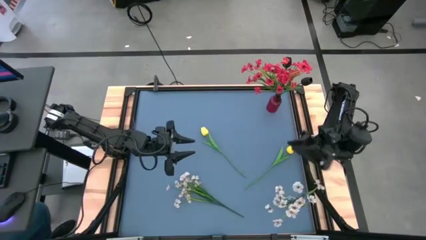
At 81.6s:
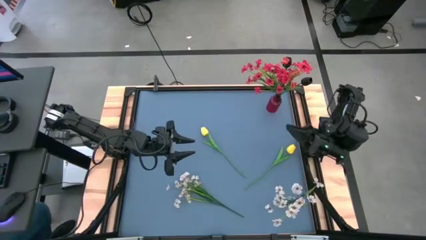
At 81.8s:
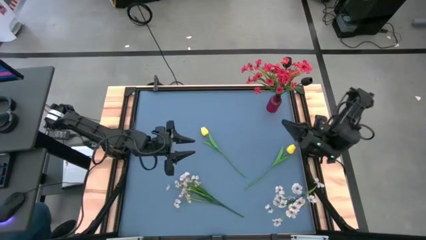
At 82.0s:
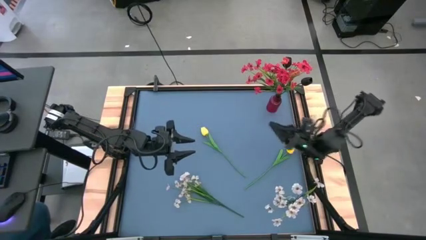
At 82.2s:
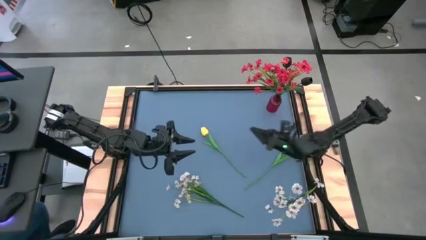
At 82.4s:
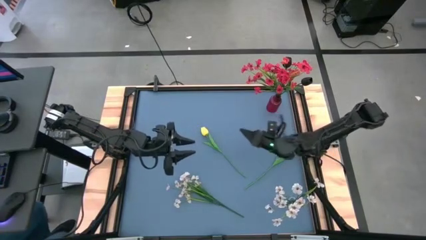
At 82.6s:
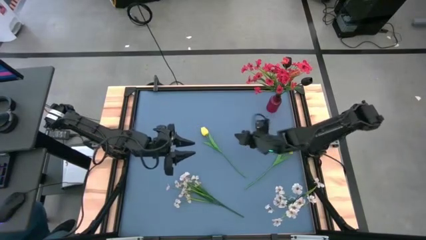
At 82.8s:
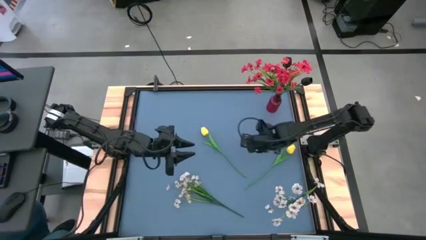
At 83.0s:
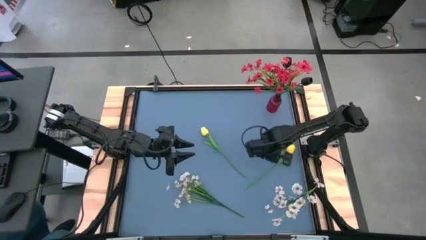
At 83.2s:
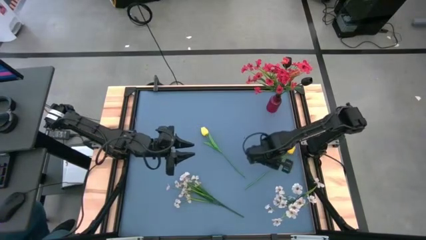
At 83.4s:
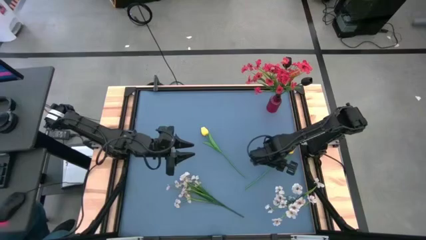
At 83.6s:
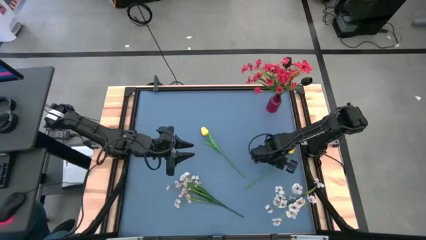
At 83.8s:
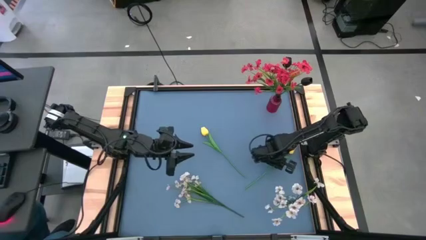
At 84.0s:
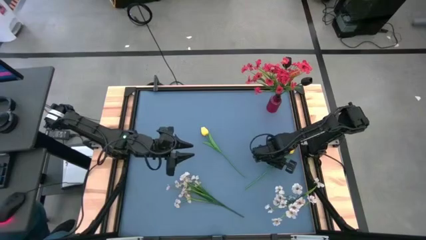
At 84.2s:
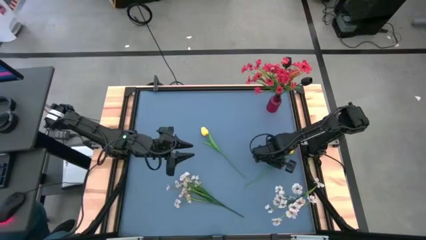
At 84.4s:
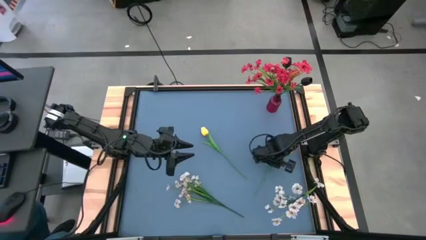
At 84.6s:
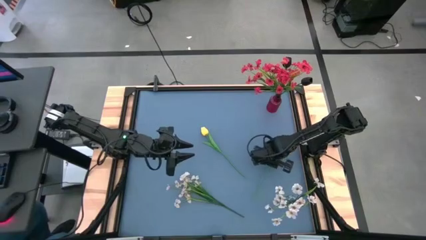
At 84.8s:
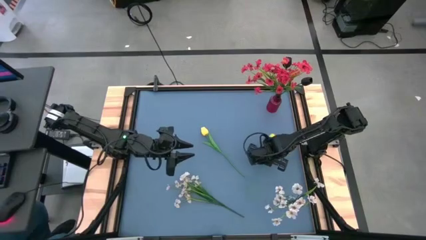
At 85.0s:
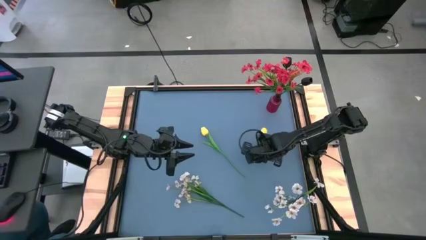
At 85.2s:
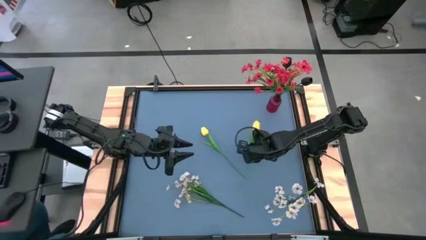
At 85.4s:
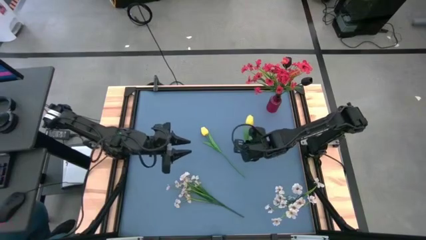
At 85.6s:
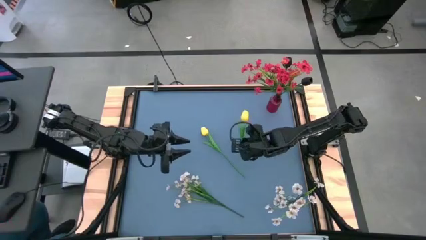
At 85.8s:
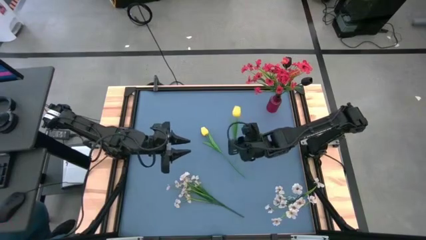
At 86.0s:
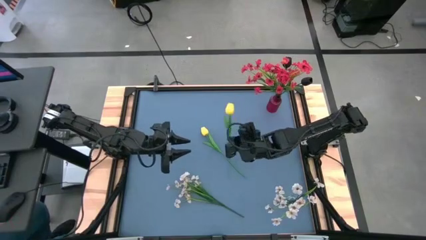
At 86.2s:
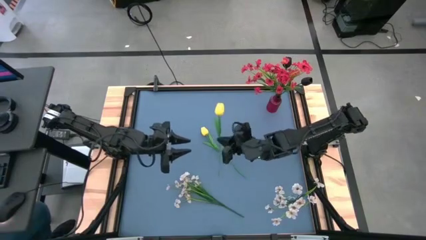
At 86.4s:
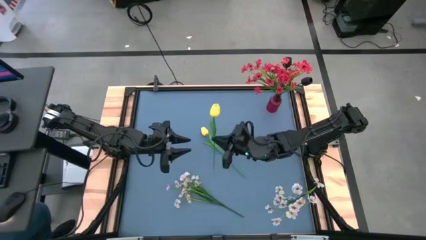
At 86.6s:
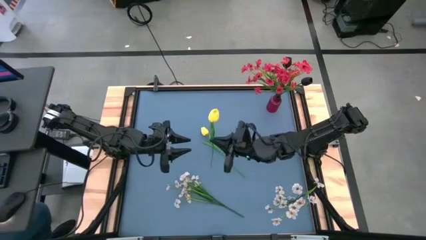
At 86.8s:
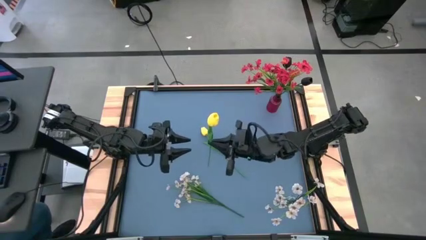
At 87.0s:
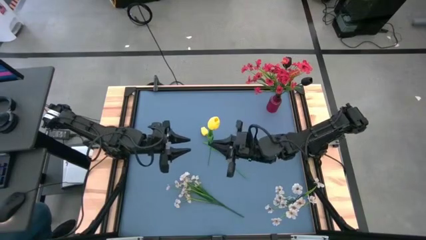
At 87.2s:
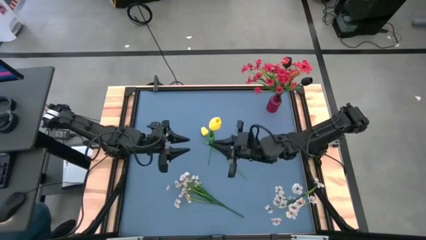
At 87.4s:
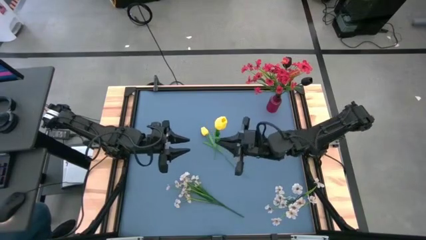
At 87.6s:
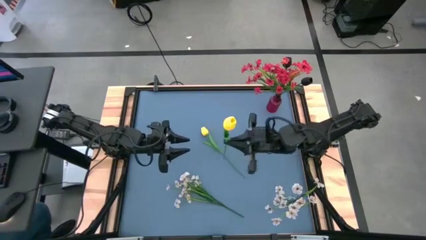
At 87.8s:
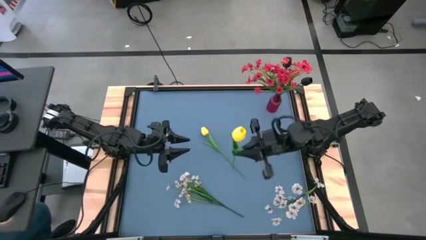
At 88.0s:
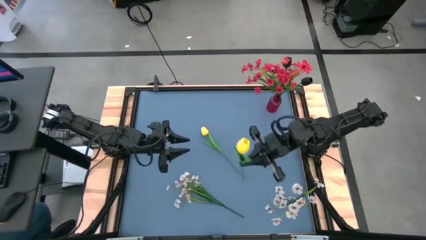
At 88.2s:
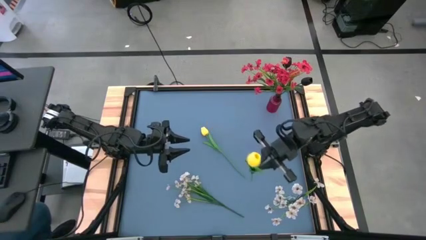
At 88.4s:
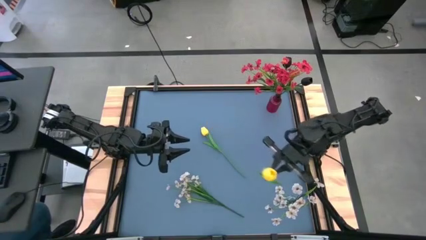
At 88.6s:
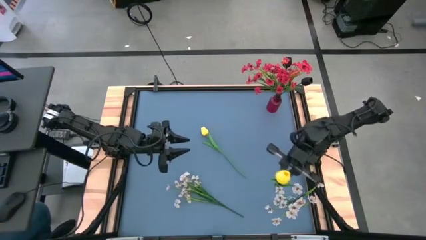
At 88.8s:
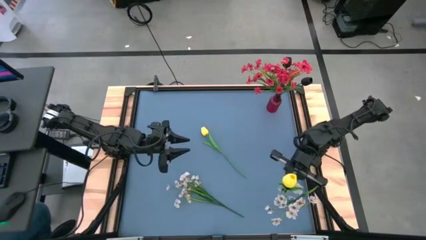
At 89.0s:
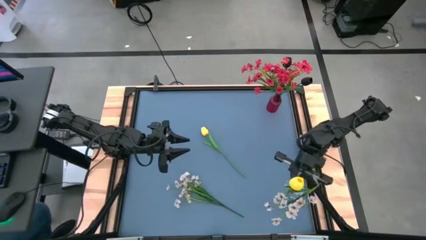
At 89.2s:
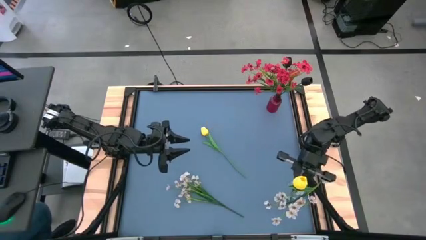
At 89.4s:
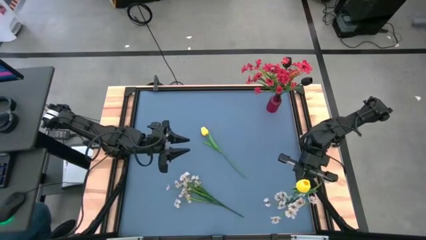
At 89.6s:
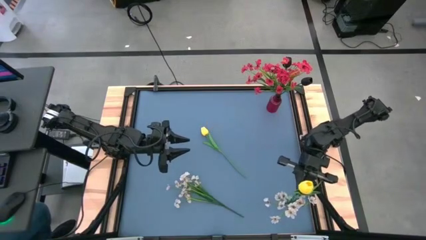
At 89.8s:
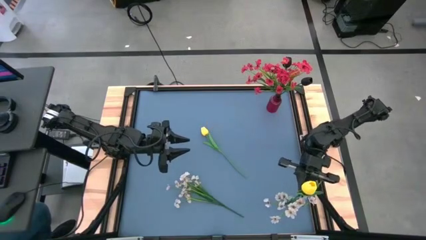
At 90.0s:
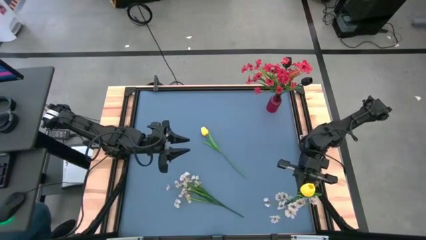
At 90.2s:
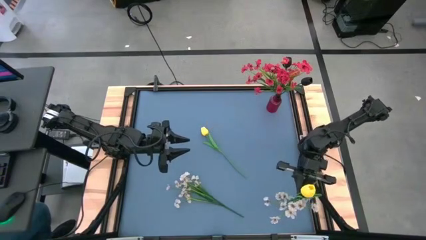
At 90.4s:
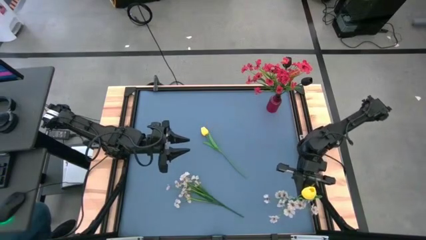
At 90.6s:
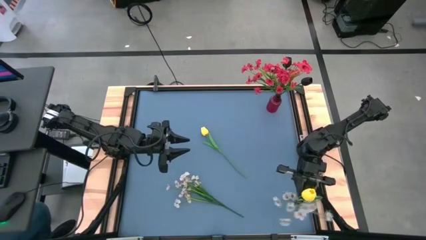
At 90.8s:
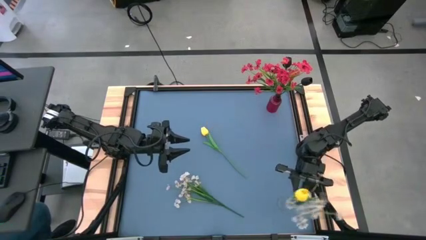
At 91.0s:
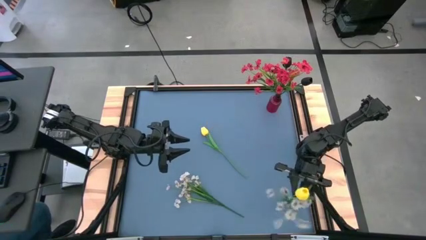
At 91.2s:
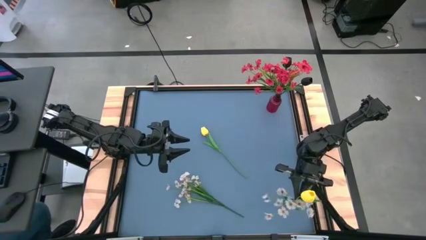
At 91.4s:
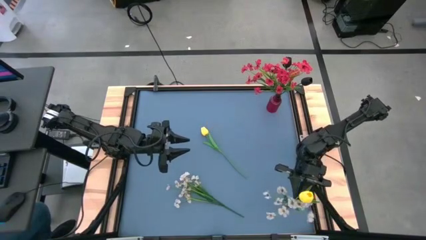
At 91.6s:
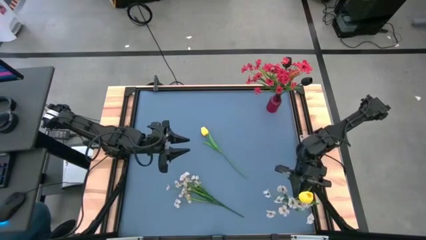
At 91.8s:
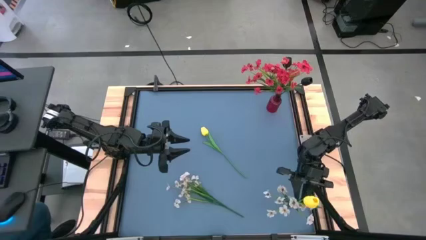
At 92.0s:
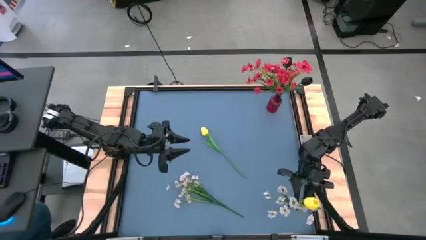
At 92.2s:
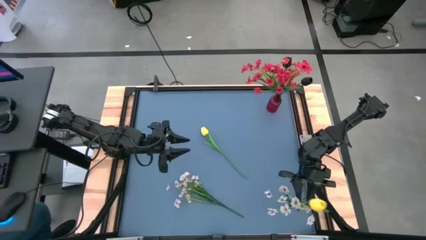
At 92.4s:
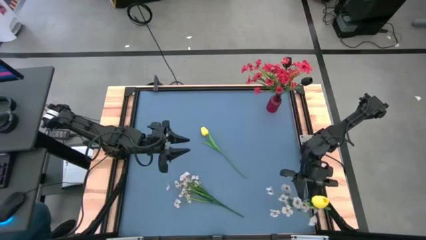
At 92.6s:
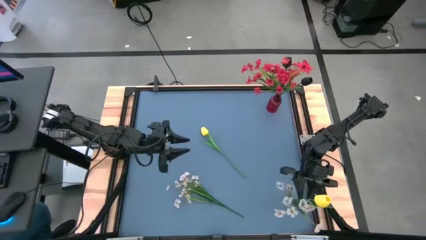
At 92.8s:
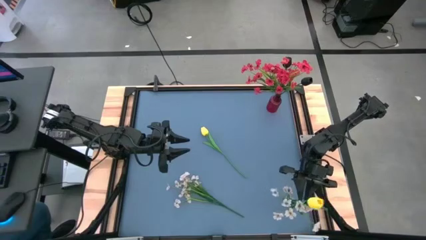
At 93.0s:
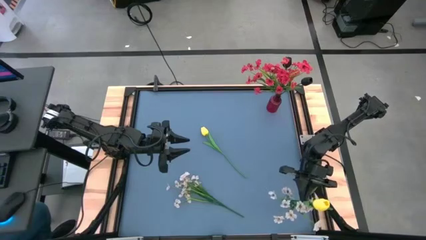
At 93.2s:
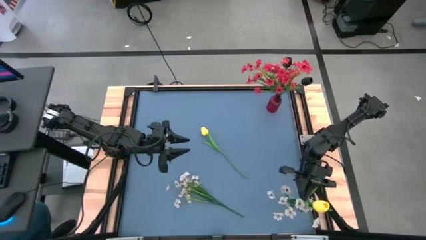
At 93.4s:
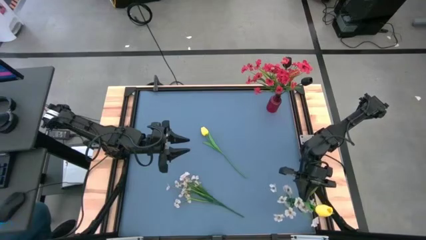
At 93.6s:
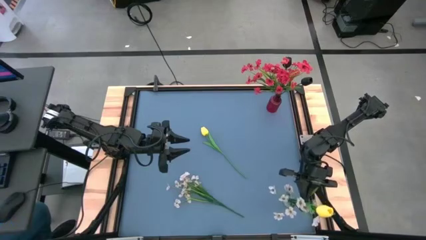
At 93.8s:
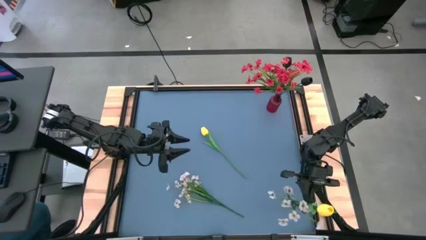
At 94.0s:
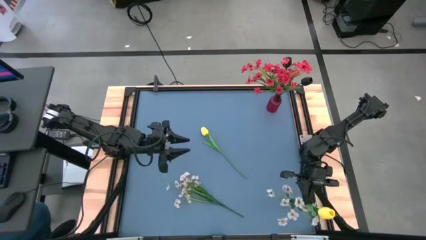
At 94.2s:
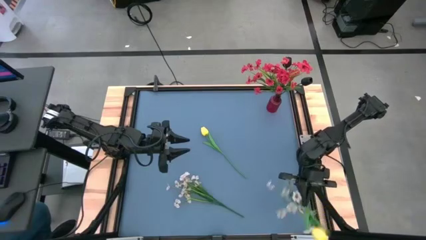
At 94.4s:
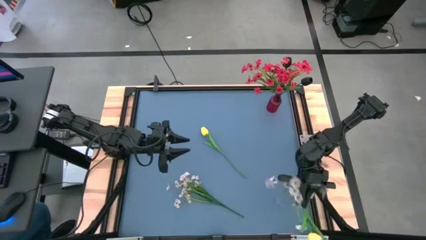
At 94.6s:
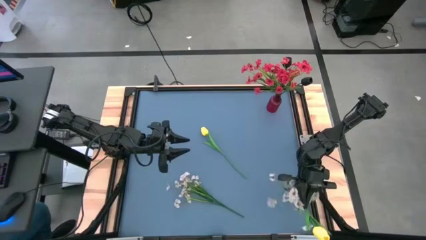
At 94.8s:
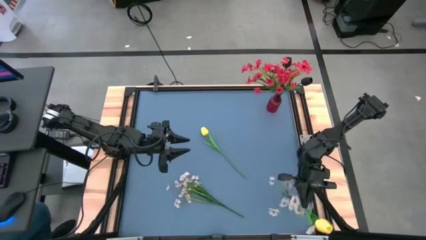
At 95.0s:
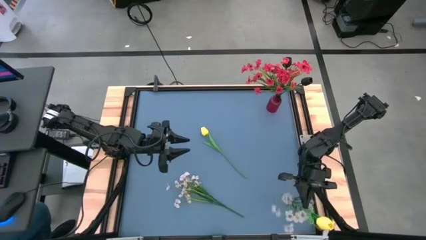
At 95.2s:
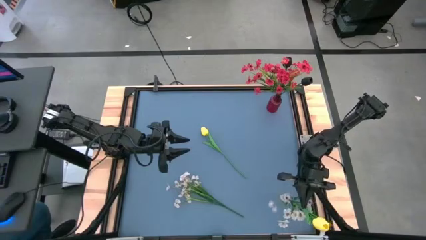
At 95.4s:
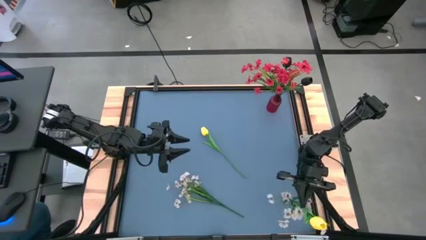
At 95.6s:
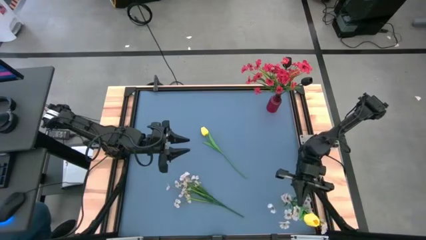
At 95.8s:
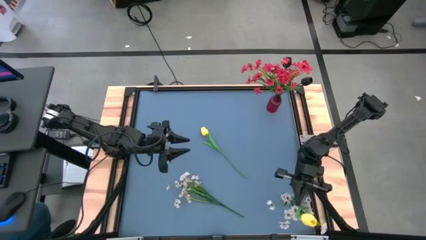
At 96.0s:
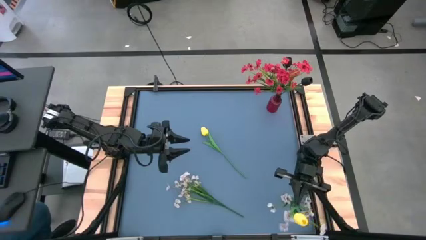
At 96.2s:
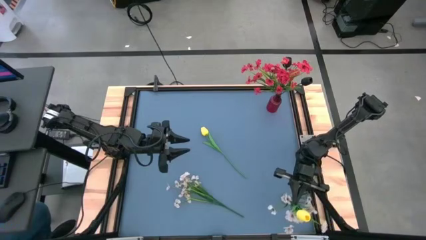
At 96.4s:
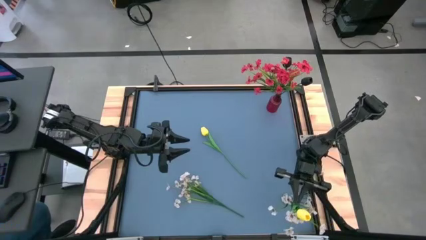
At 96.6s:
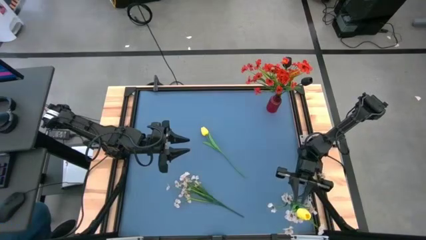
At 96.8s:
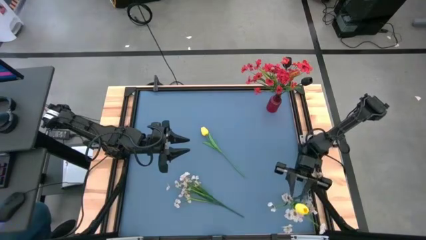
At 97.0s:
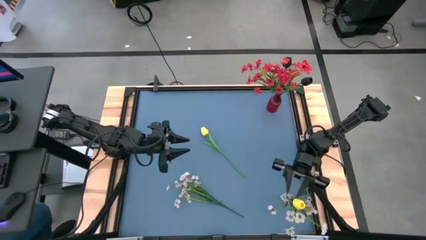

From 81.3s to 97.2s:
Task: Sort flowers into vase by color
Put the right yellow tulip into the transparent vase
